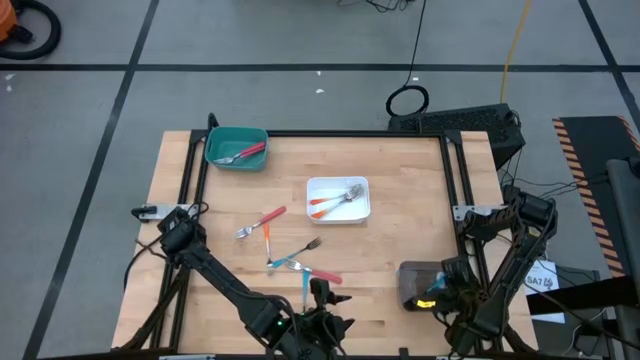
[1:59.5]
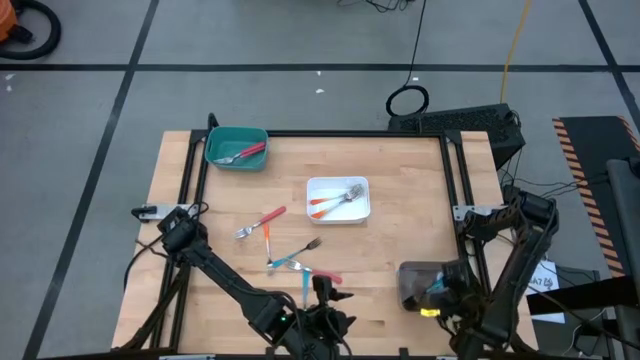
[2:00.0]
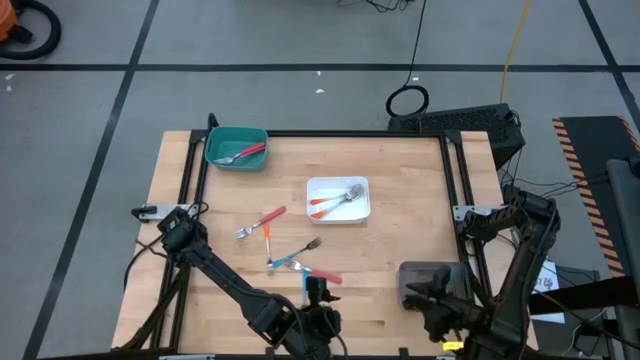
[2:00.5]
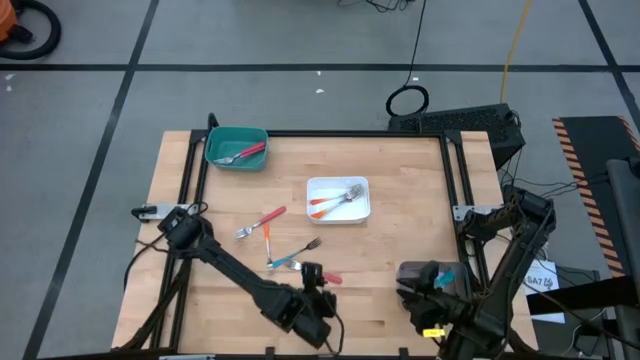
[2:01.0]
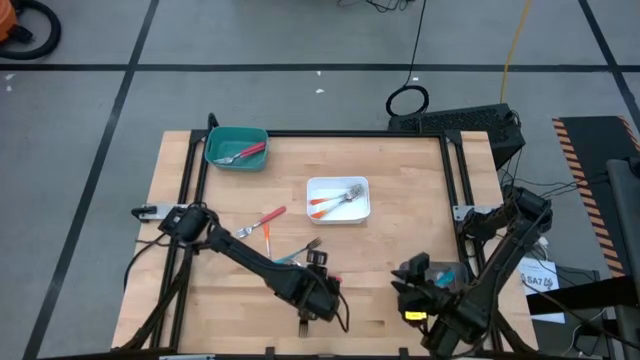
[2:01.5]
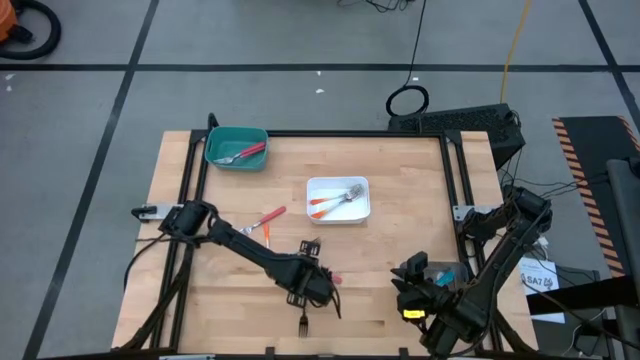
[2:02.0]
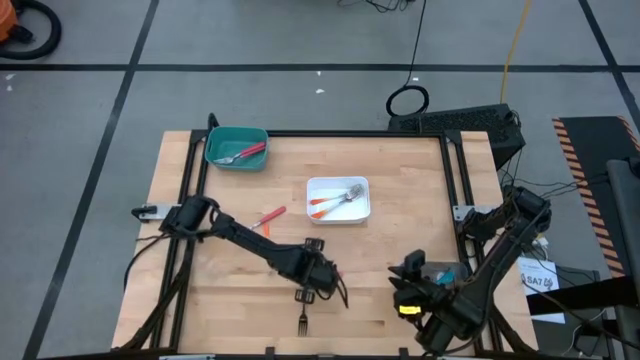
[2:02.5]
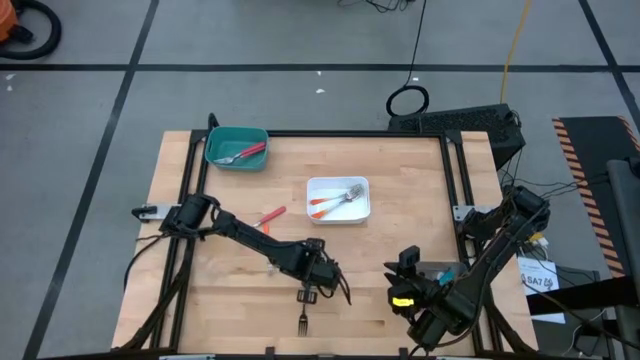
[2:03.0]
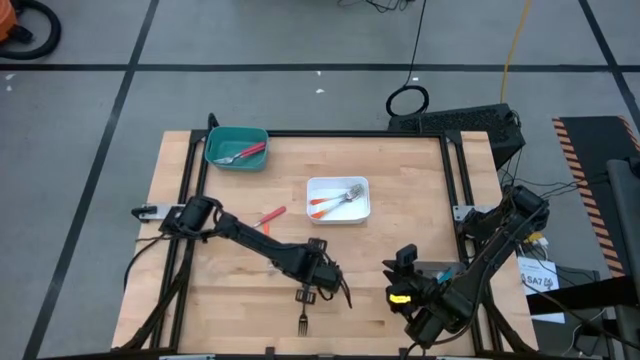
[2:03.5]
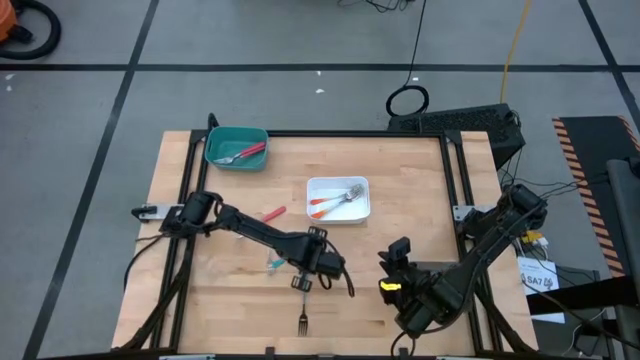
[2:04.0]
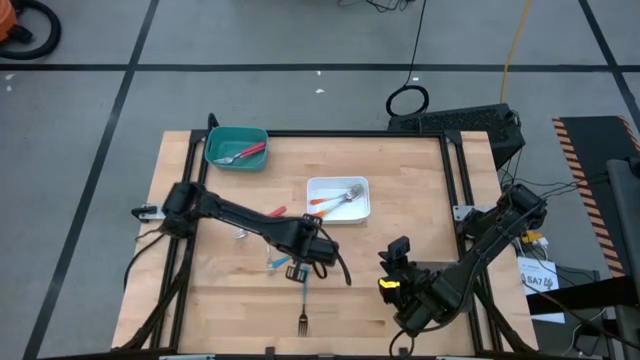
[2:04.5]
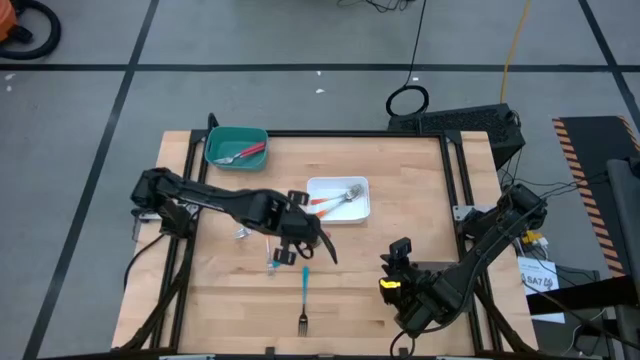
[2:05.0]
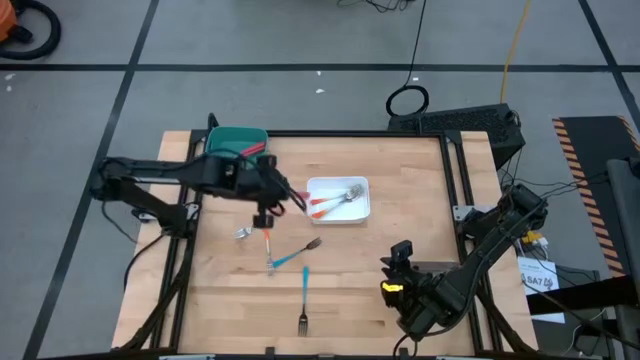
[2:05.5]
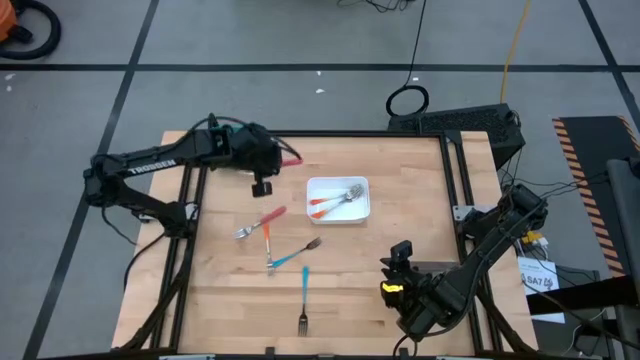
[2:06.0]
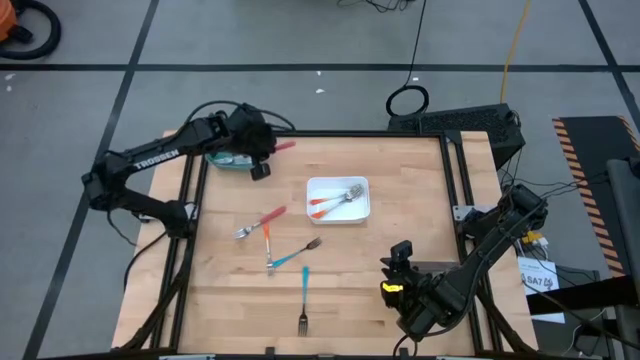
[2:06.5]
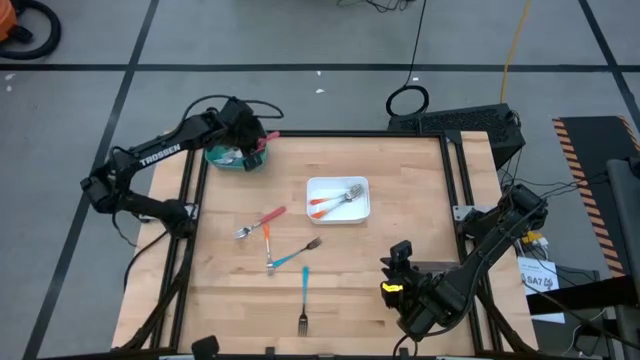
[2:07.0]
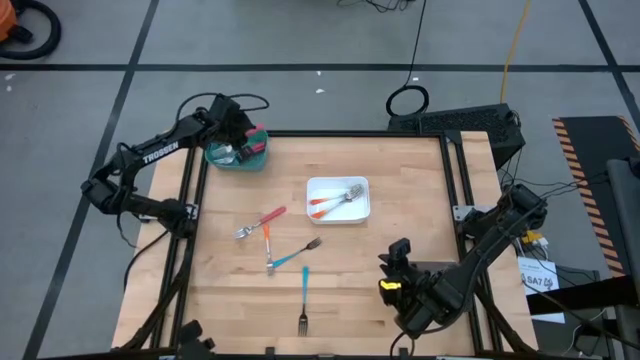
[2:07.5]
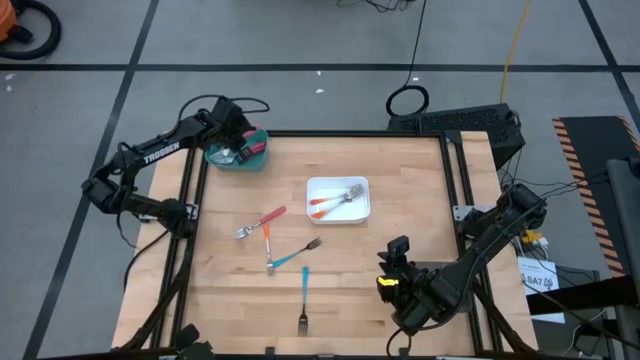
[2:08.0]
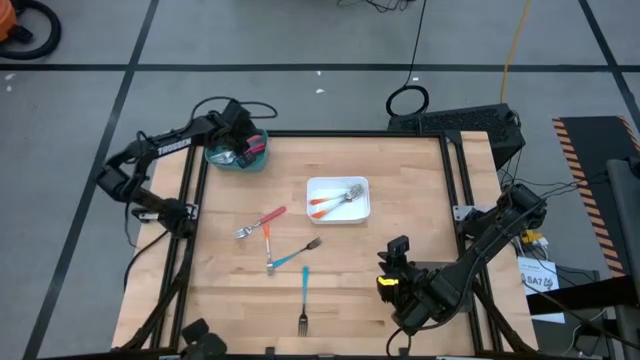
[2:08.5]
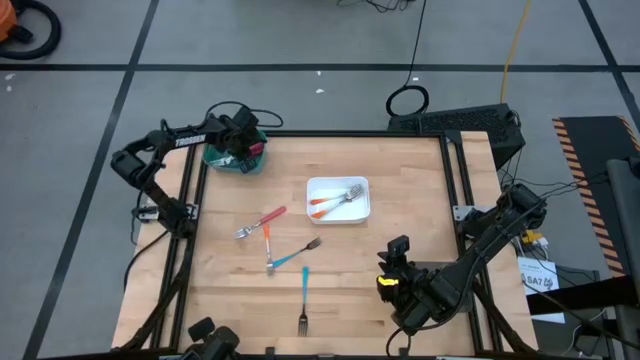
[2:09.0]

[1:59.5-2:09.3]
Task: Sort silverware by color (type)
Put the pink fork into the blue bin

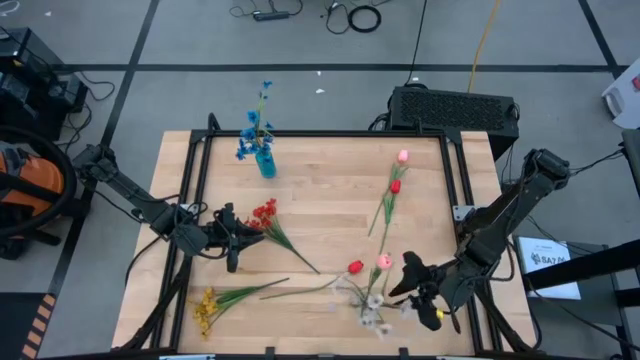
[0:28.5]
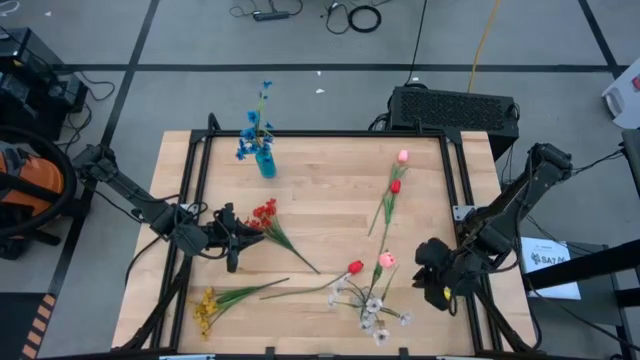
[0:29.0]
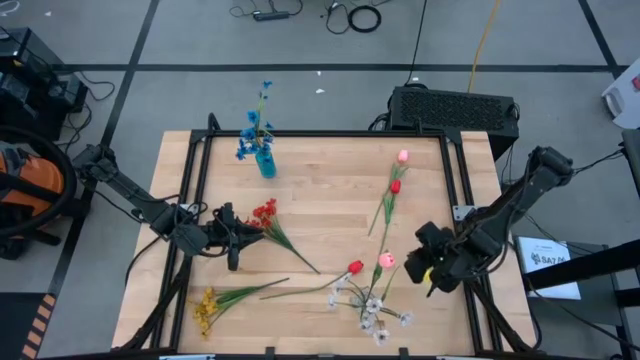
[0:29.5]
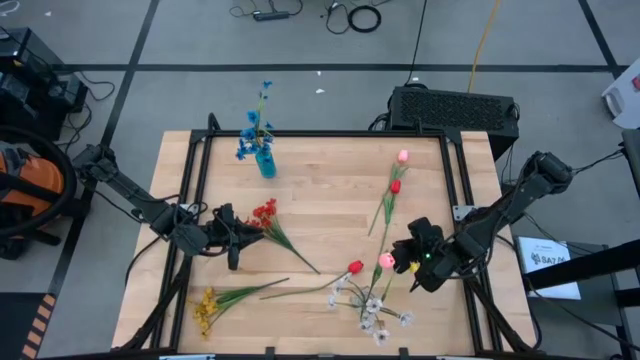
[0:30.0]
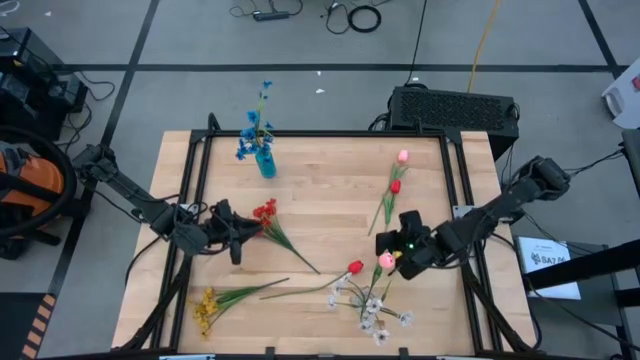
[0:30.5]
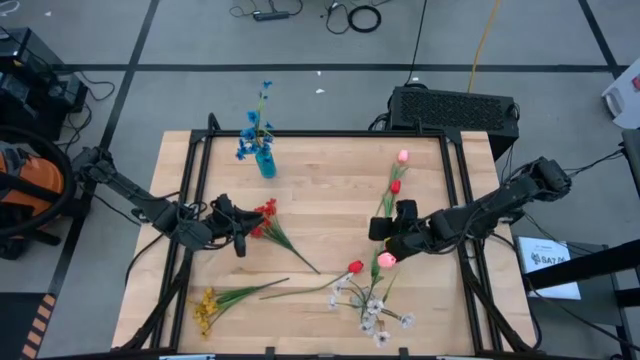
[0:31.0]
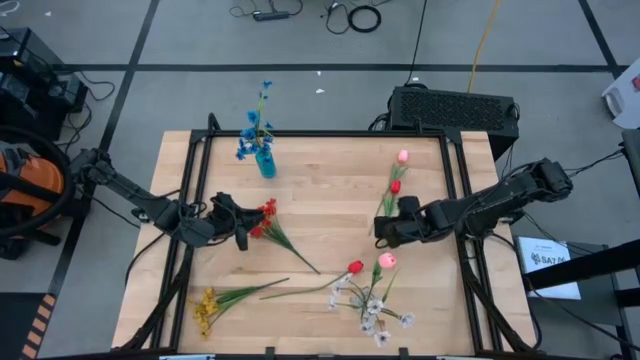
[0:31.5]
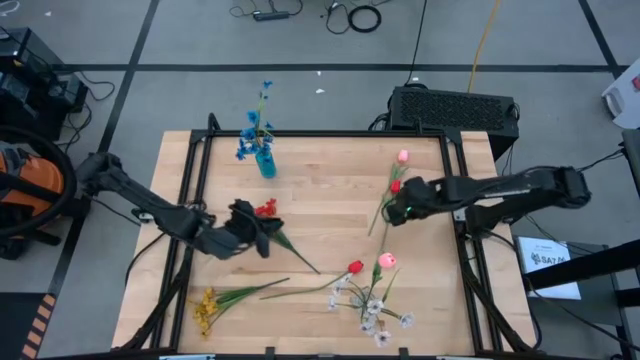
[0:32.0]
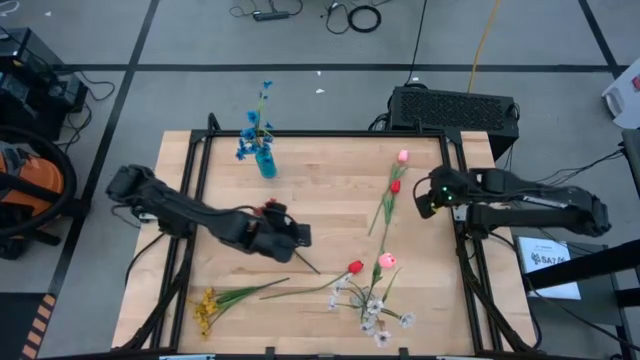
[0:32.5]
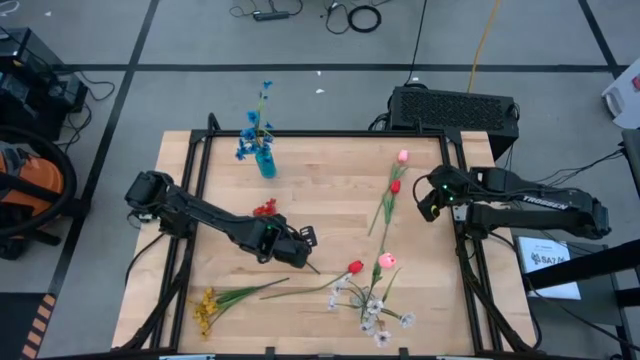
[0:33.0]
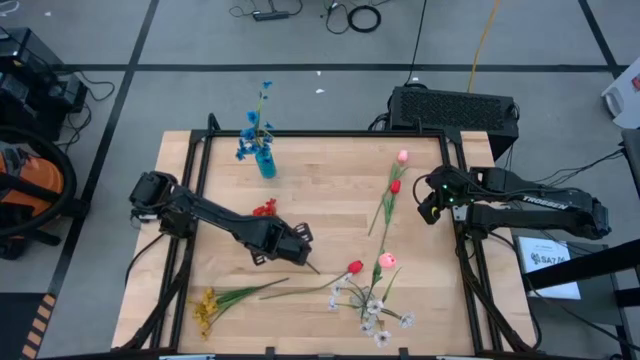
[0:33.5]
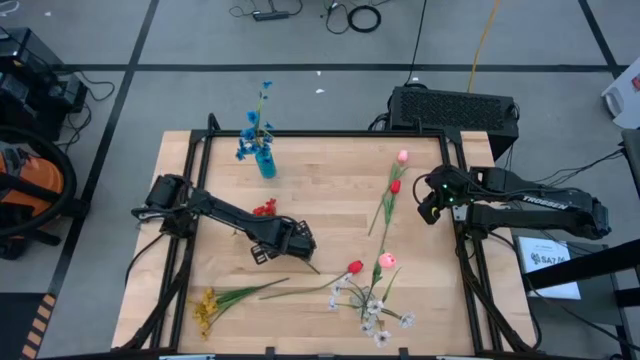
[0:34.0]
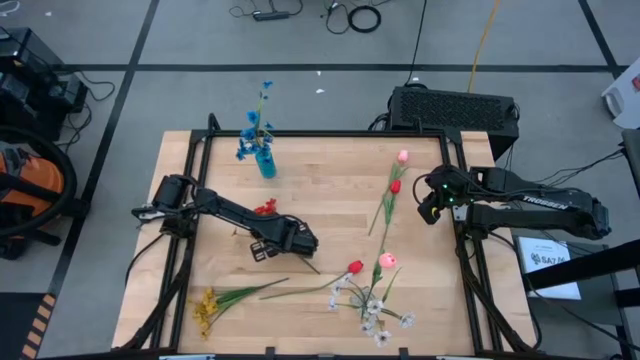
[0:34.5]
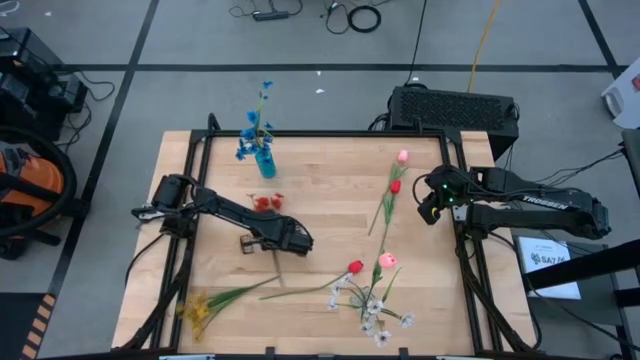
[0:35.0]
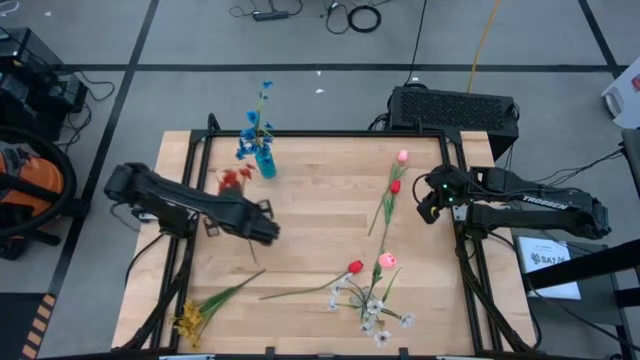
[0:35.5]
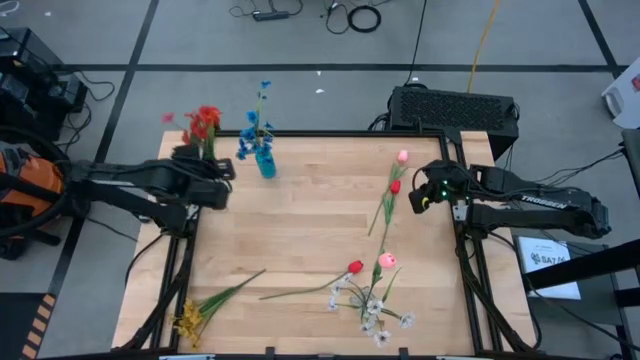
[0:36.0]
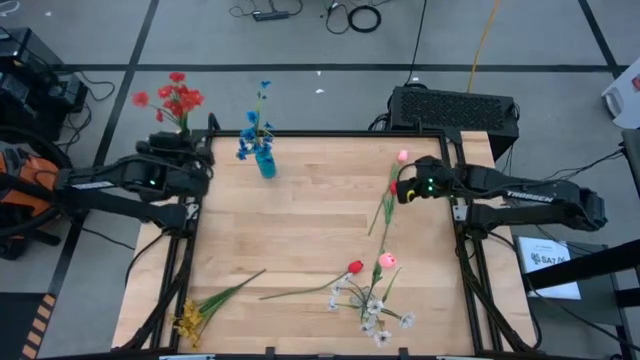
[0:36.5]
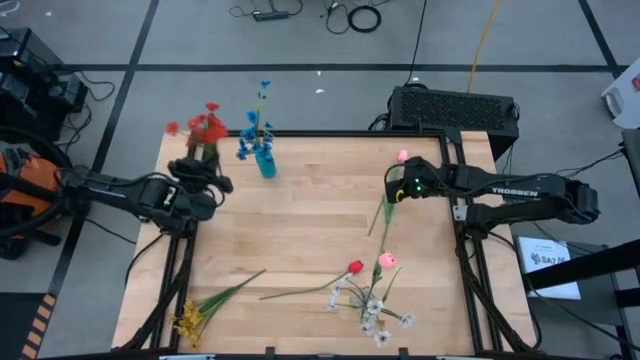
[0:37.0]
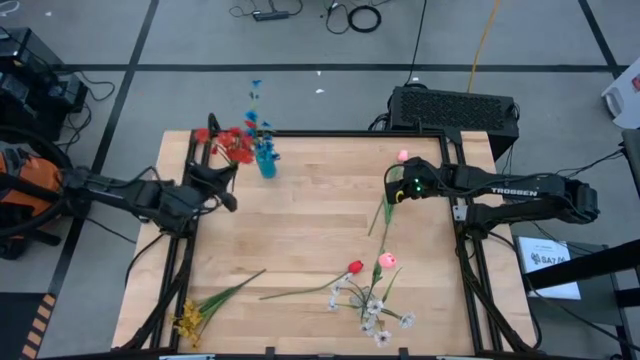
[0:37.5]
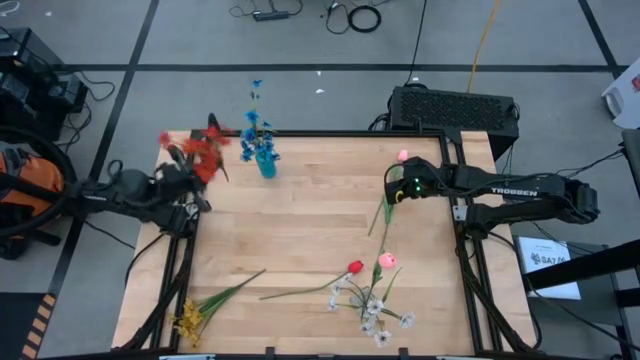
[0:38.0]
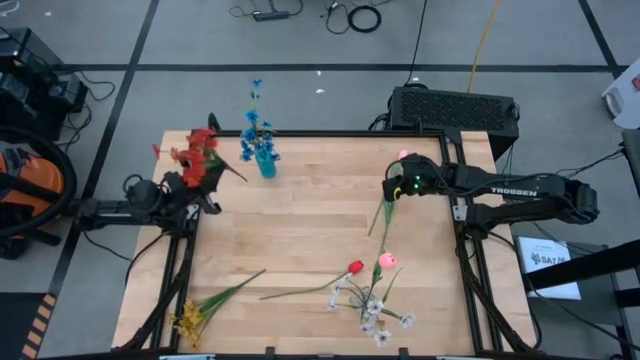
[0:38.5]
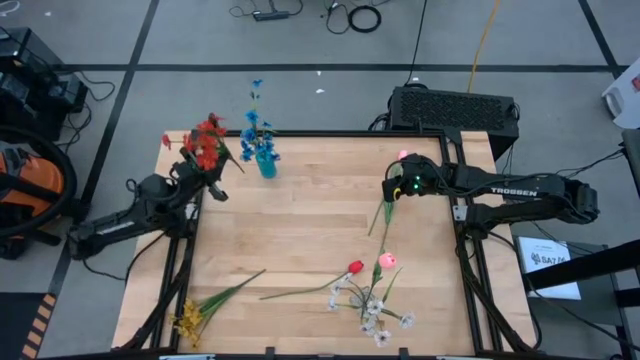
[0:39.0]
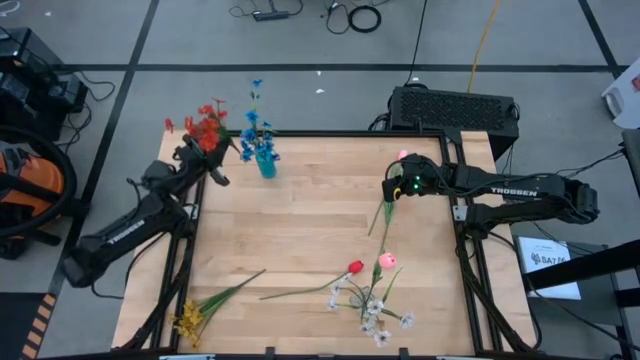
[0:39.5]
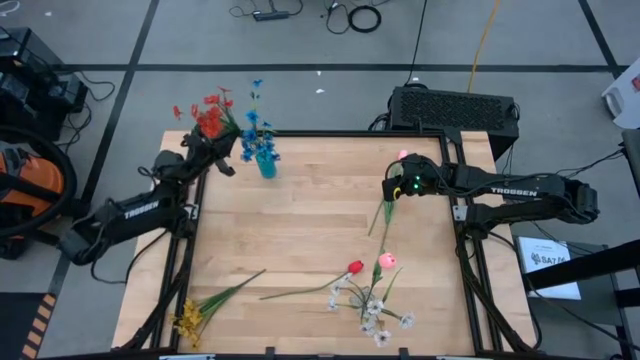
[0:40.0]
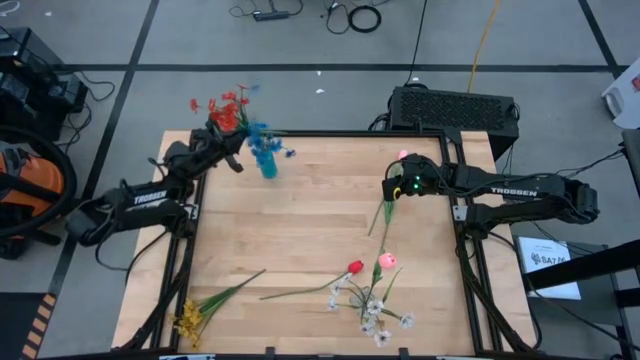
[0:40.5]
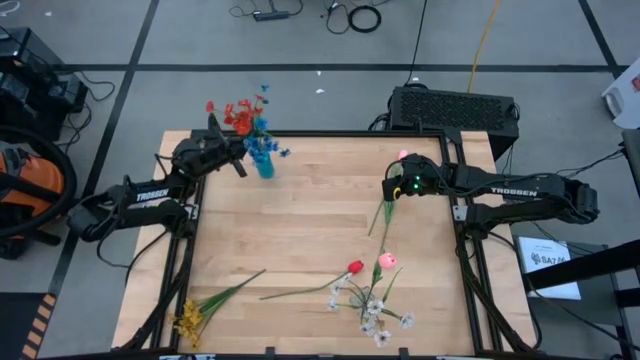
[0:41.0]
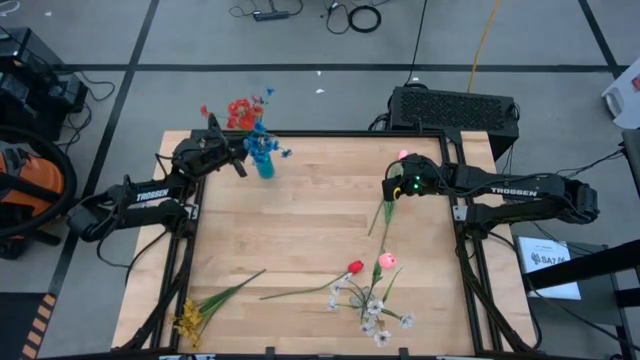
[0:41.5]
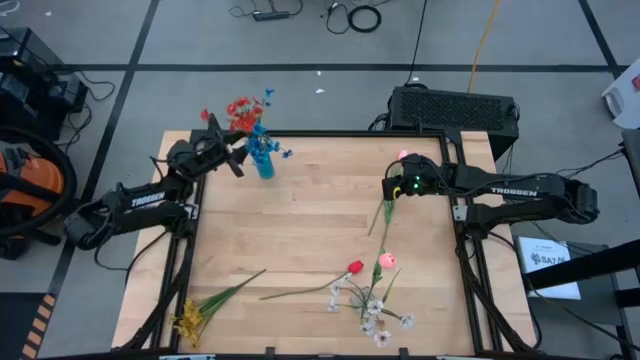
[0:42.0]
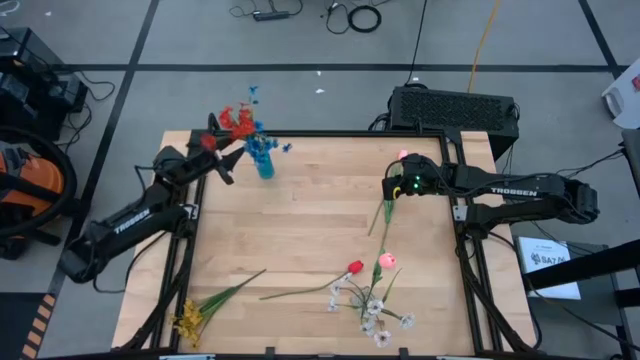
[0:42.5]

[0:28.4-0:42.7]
Task: Sort flowers into vase by color
Put the left red flower into the blue vase
